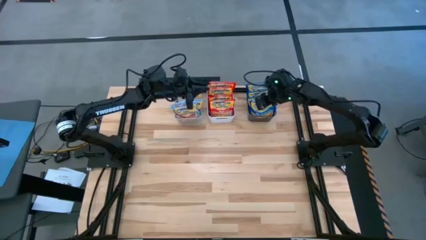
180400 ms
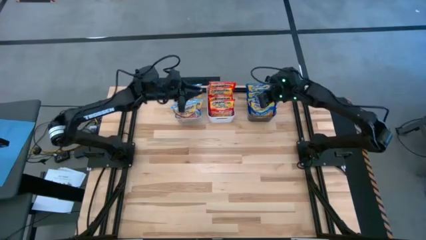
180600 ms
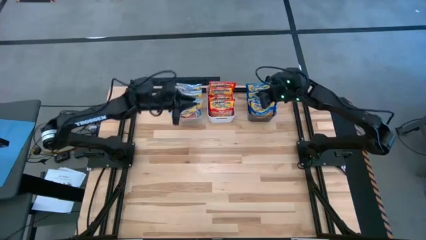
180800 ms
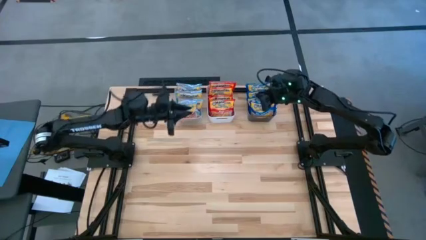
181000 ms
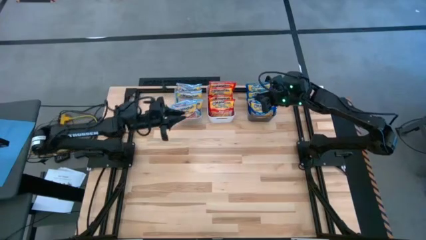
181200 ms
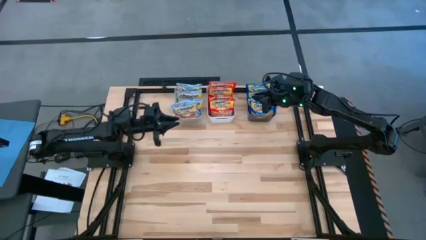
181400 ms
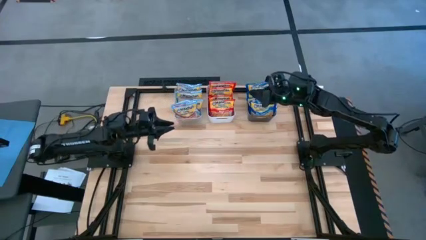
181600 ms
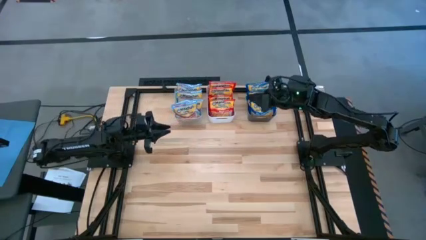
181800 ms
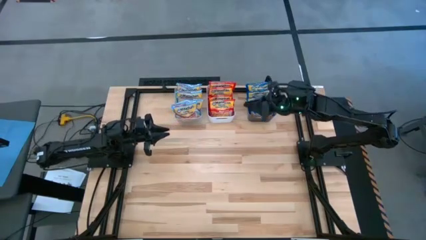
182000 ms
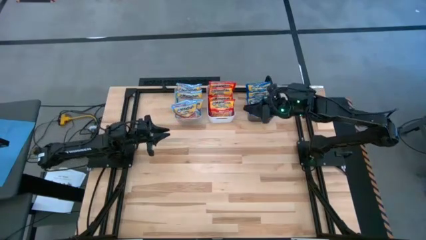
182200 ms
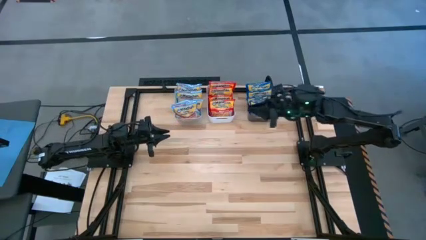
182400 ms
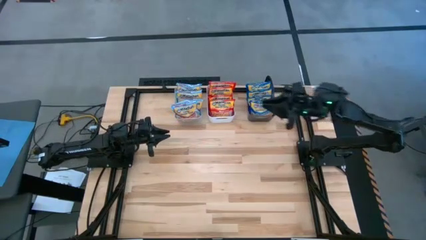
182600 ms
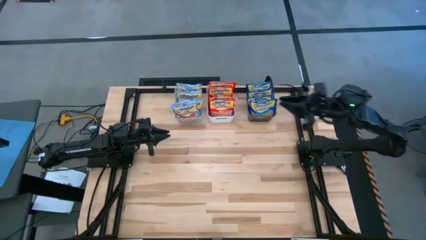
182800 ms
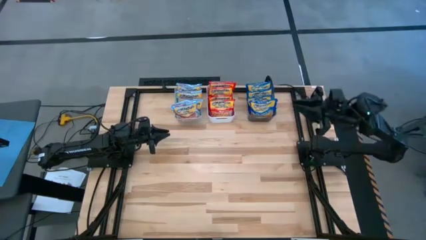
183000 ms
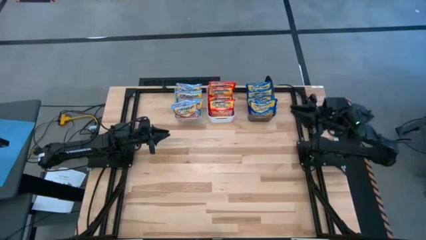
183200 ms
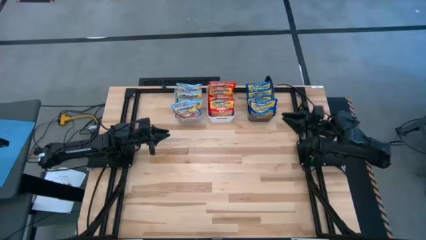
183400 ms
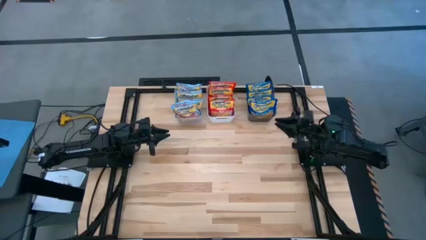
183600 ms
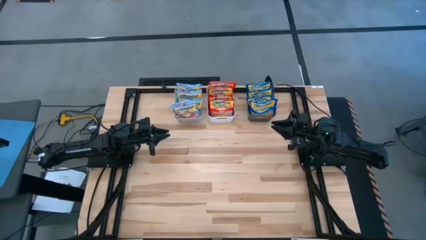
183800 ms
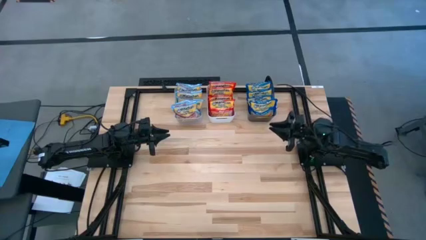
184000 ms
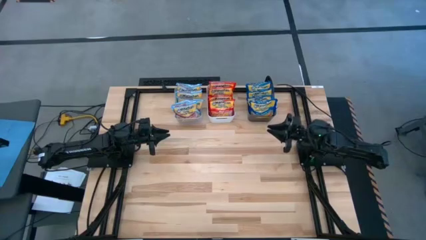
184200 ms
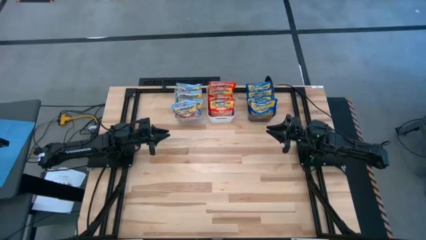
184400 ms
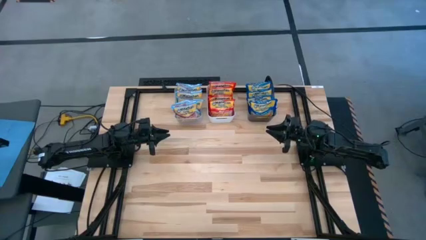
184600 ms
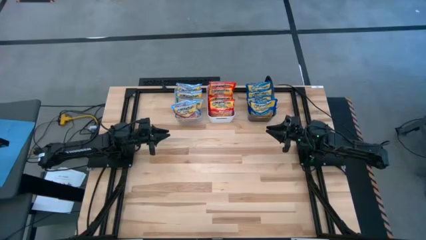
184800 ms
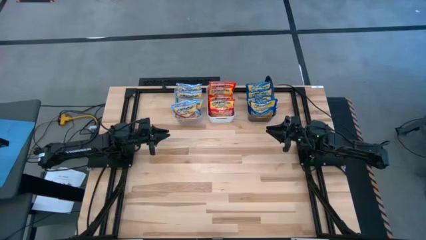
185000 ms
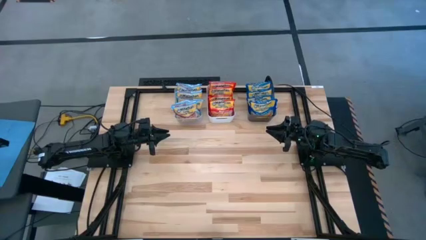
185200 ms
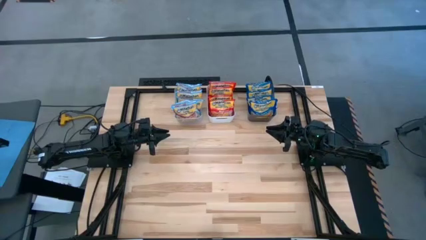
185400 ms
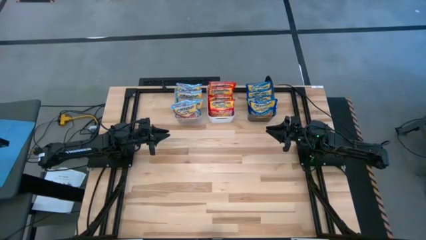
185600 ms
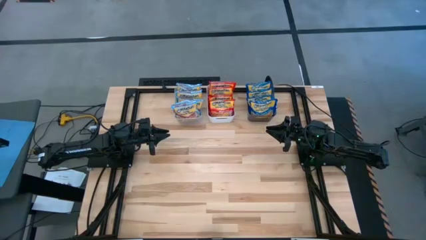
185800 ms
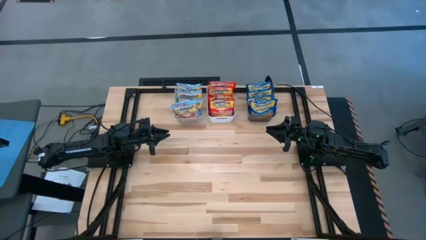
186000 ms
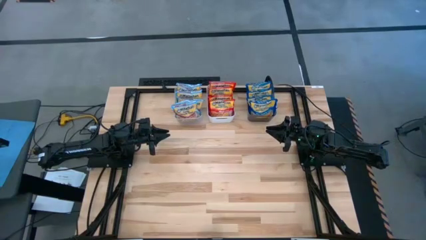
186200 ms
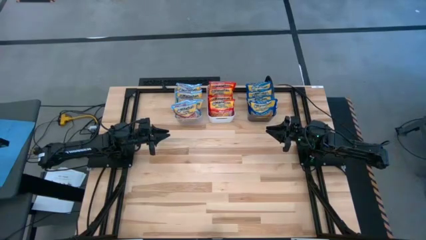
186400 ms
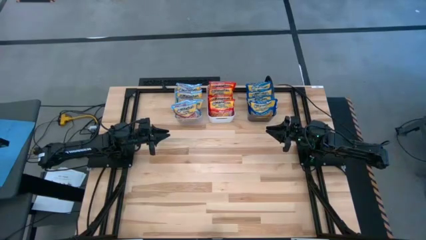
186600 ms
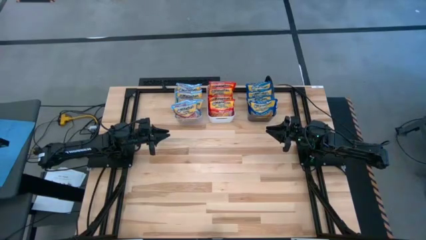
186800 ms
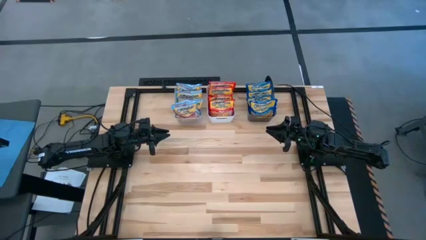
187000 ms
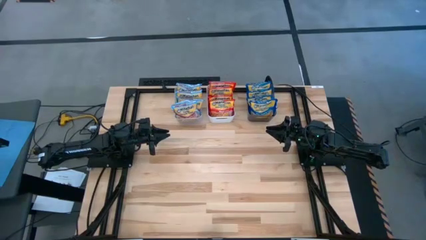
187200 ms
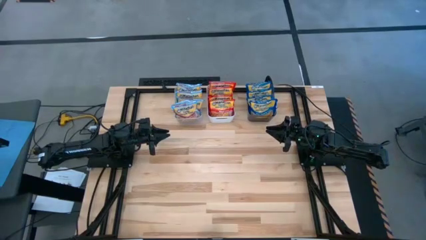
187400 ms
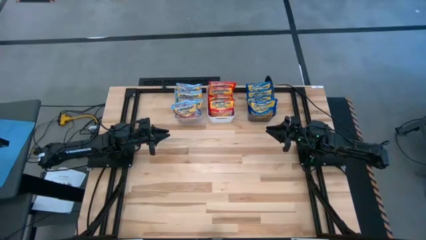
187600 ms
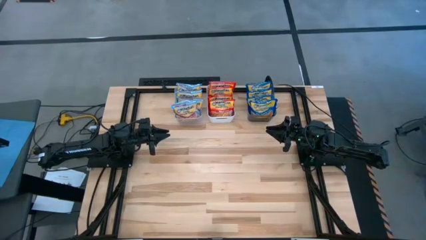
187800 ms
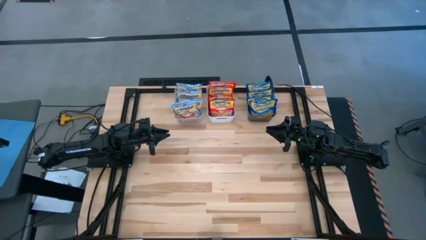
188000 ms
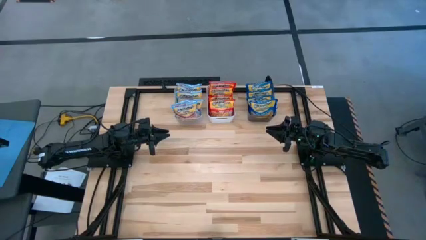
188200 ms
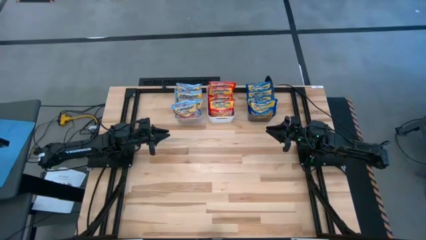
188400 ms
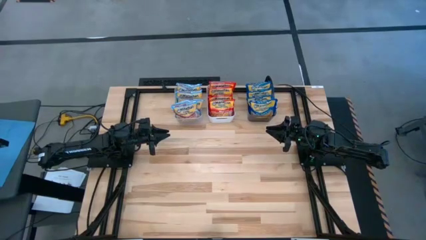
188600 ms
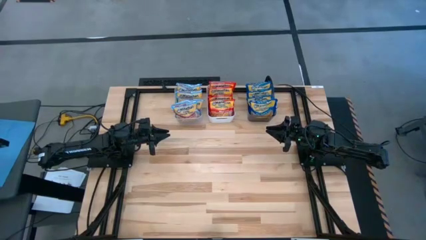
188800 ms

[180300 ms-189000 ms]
Task: Sort Maruchan noodles
Return to Home Position

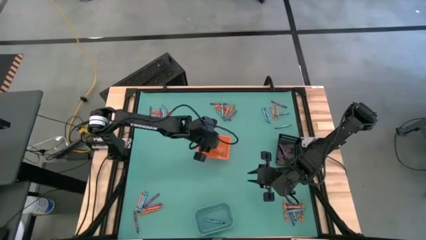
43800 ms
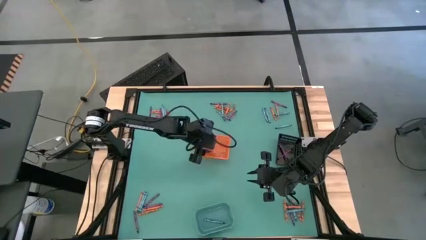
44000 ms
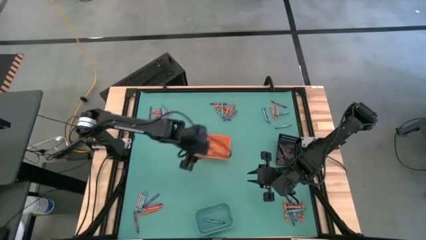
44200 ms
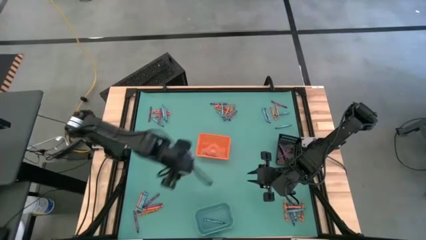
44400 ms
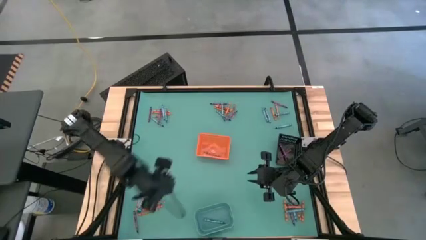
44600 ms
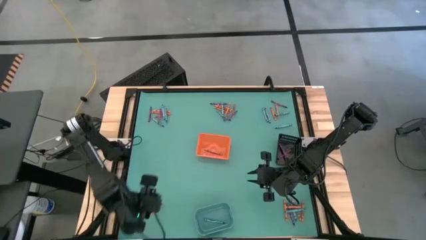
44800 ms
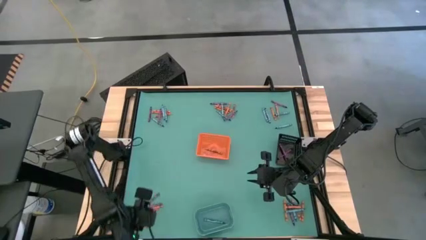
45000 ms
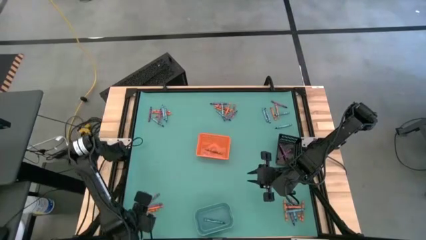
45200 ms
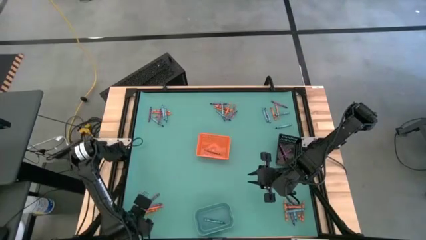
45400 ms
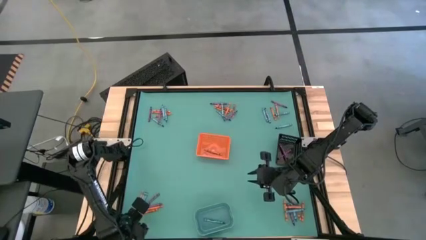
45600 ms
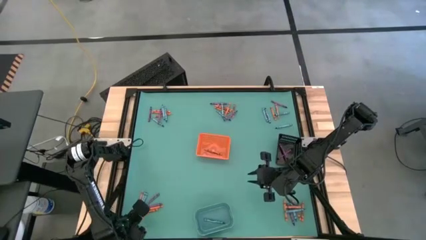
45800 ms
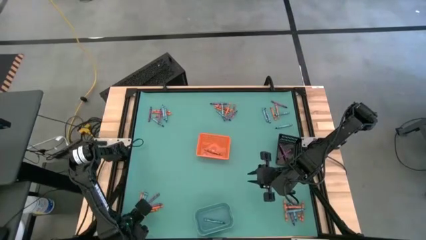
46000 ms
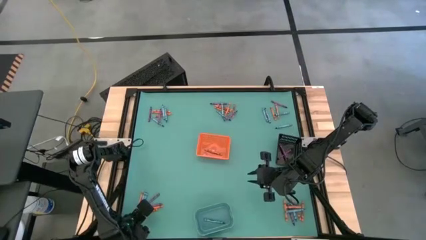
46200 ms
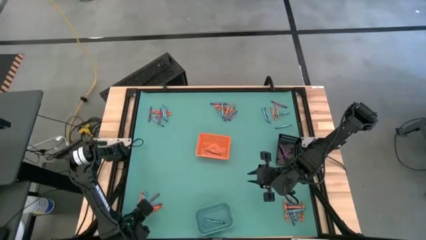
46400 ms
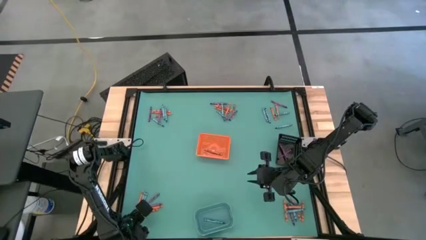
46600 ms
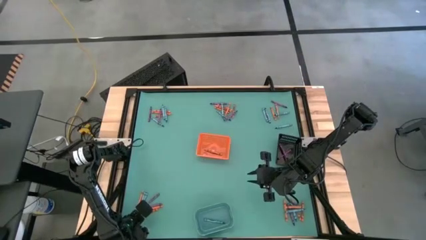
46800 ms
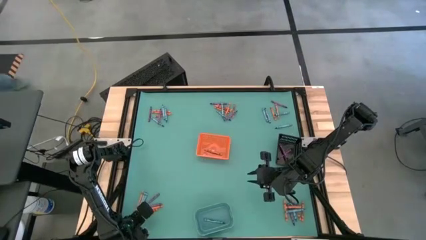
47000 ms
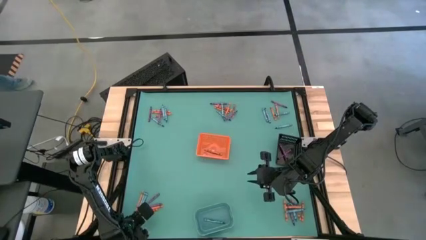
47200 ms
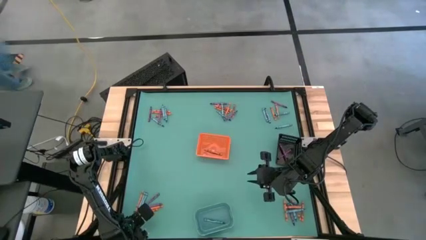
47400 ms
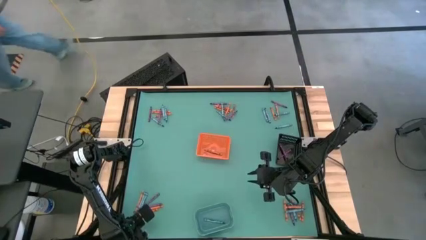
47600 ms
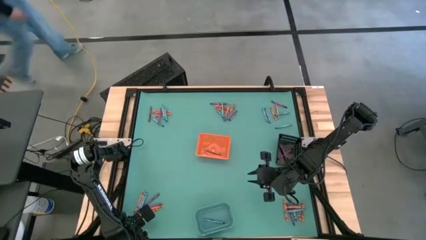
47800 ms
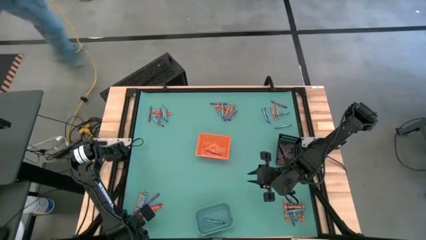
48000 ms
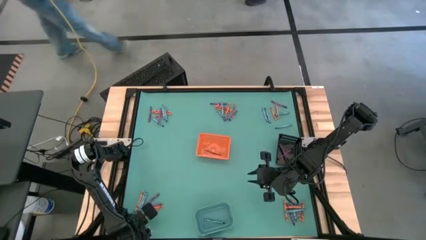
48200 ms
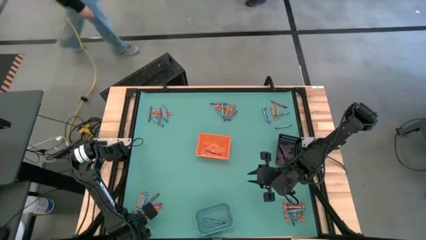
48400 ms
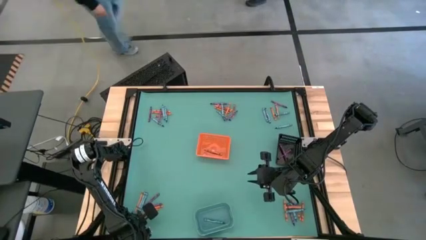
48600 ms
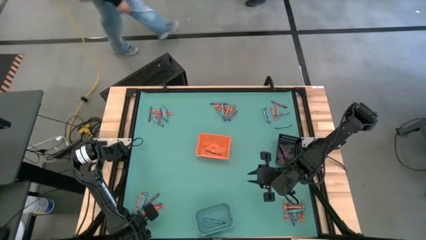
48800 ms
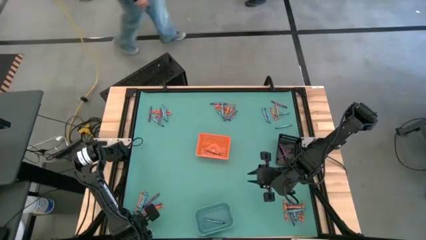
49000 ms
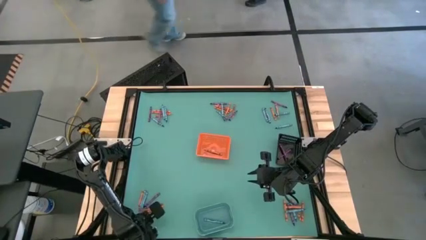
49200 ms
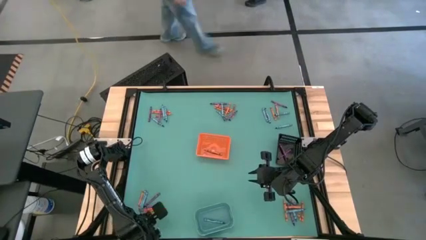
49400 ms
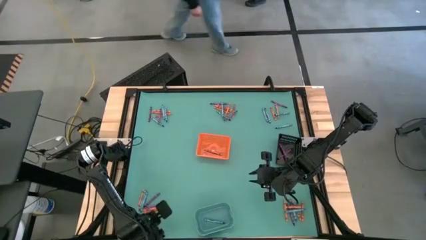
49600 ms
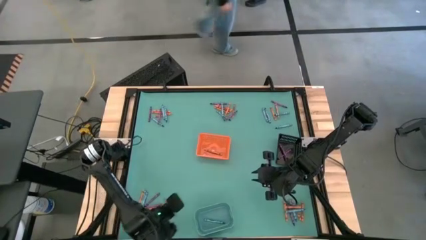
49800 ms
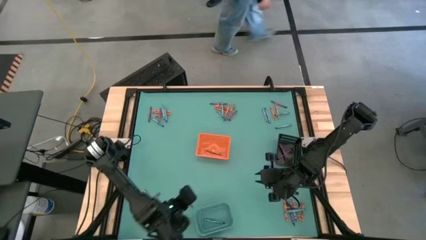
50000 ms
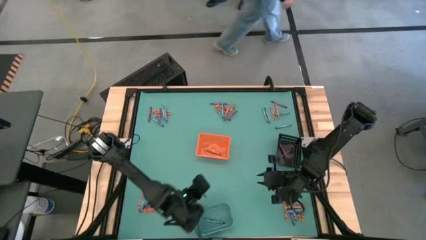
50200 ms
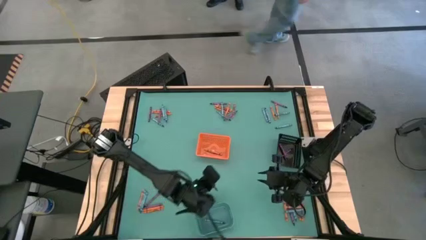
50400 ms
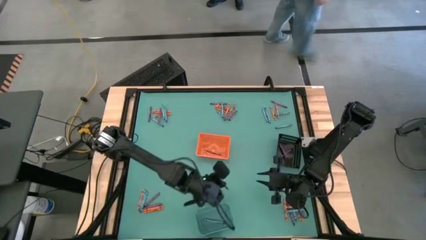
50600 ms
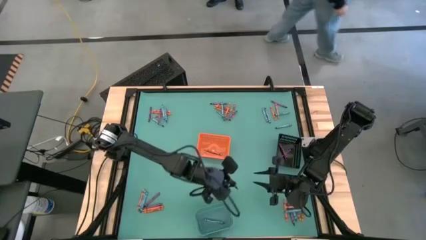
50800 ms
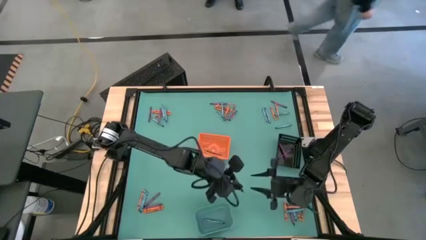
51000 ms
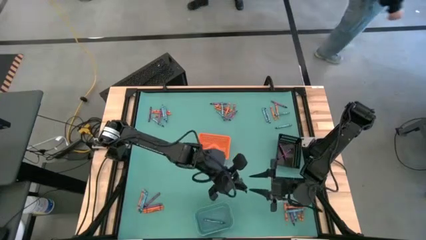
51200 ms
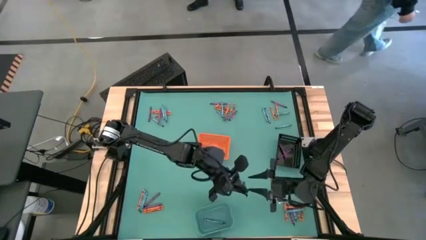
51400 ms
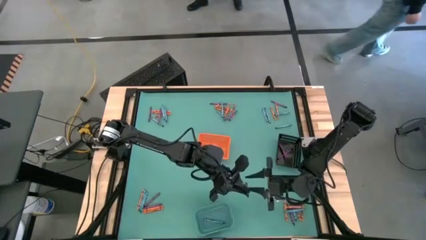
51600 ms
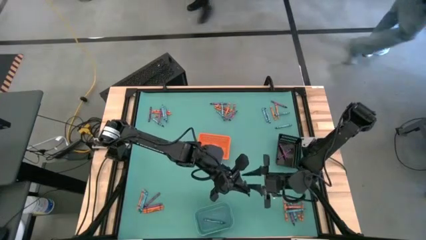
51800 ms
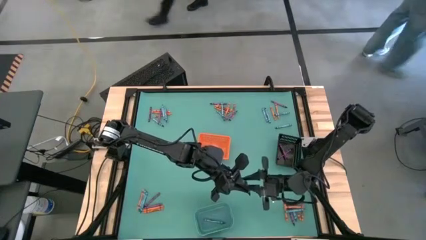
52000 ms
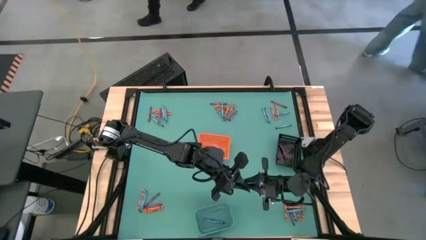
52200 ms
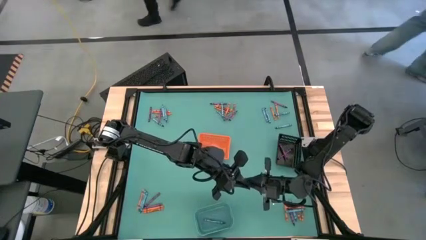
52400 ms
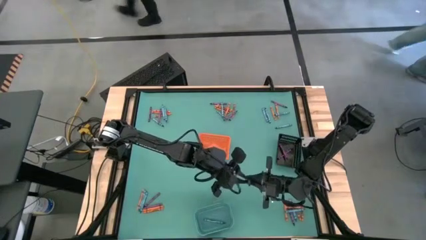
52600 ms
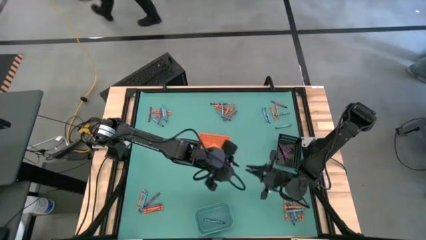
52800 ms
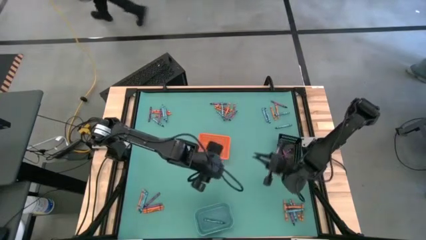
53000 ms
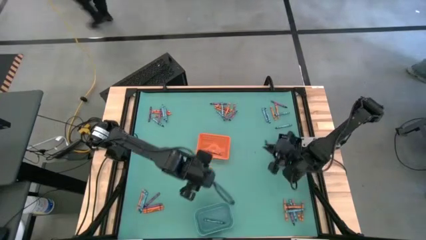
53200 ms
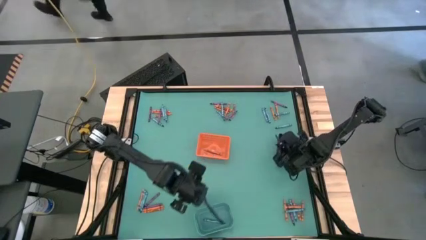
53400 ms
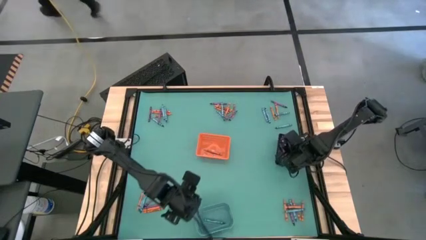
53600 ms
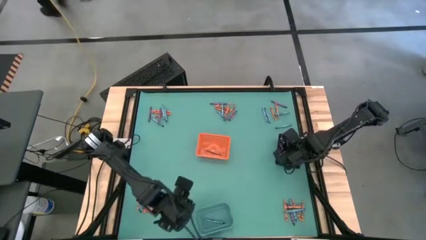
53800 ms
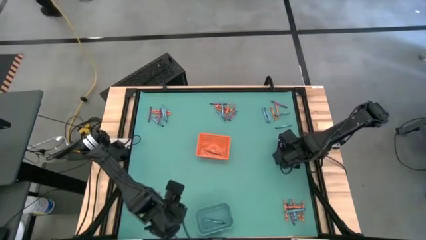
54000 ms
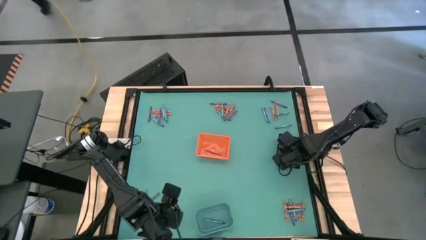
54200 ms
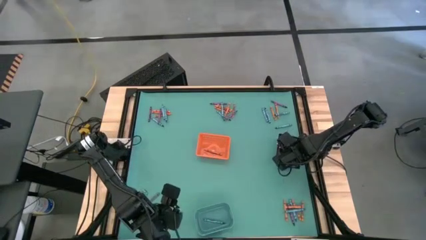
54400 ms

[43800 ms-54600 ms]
Task: Sort crayons
Put the purple crayon into the black bin
